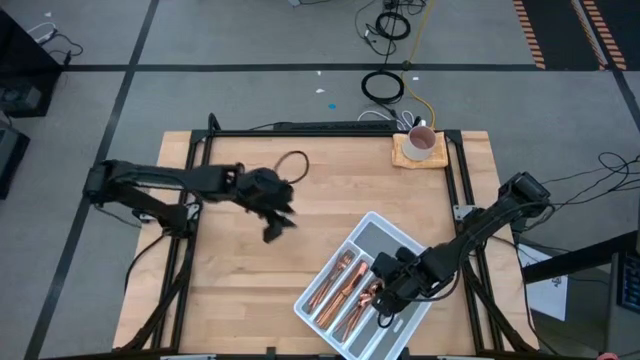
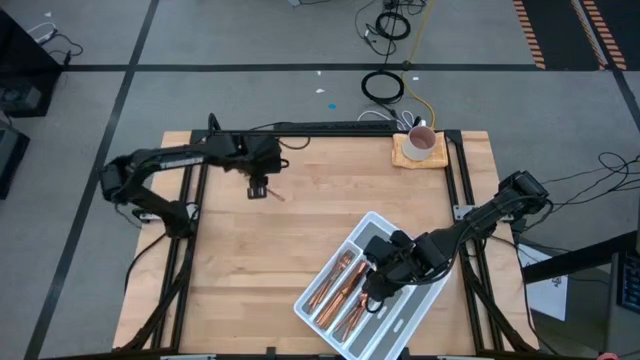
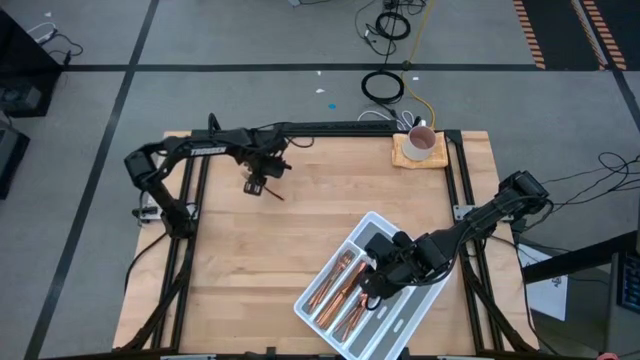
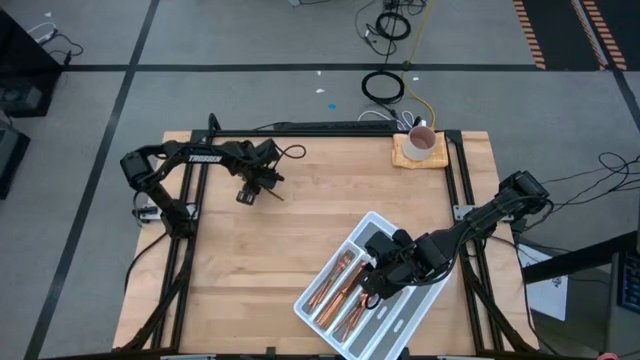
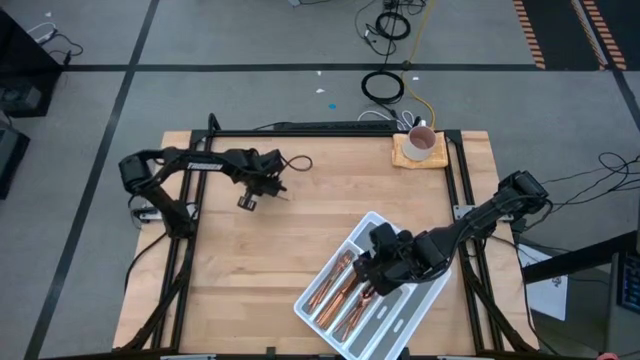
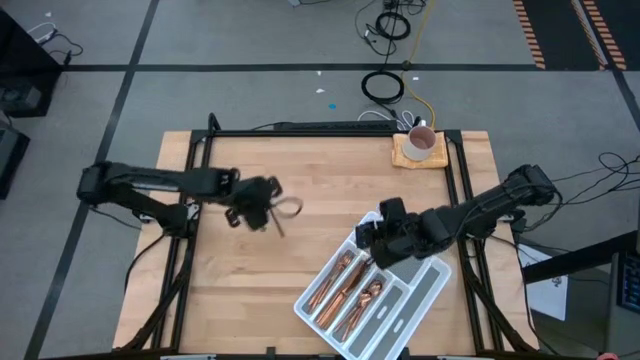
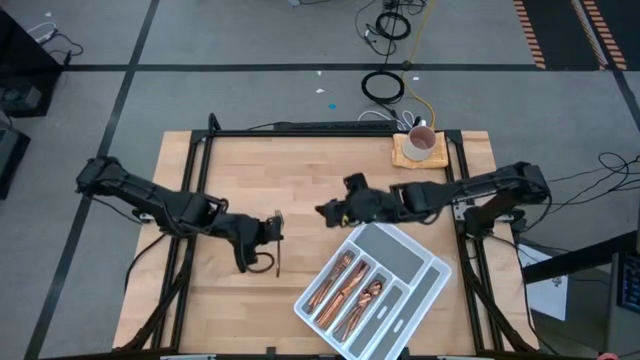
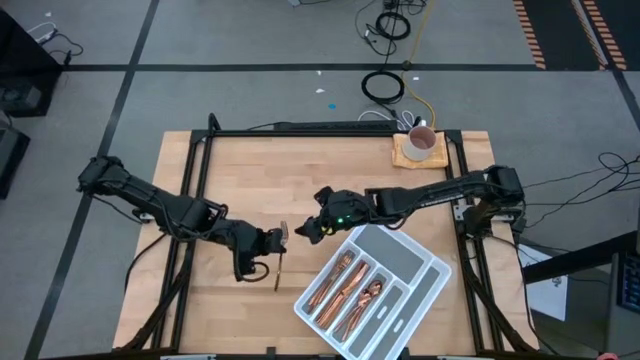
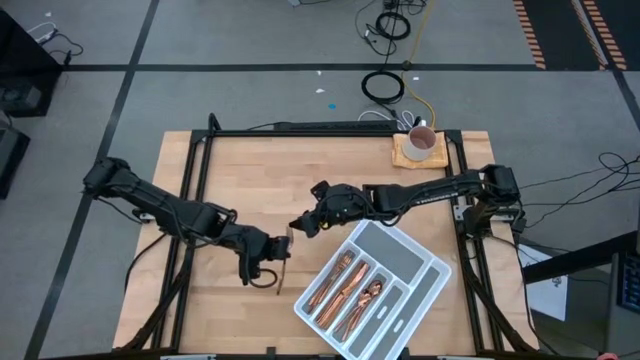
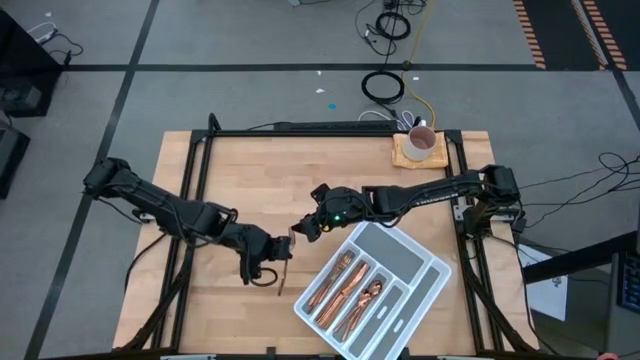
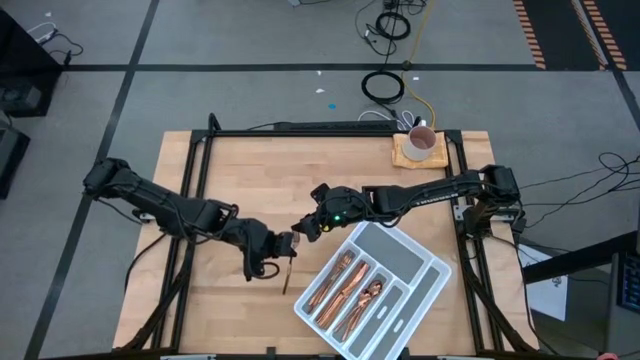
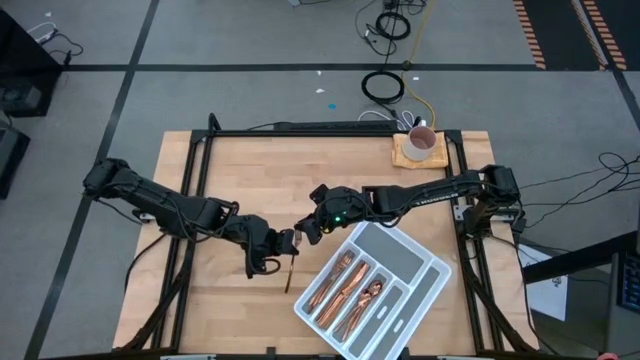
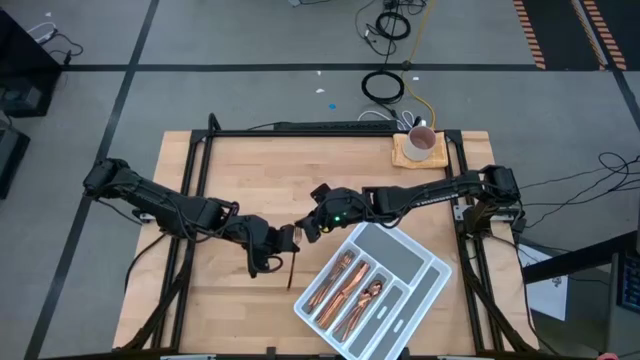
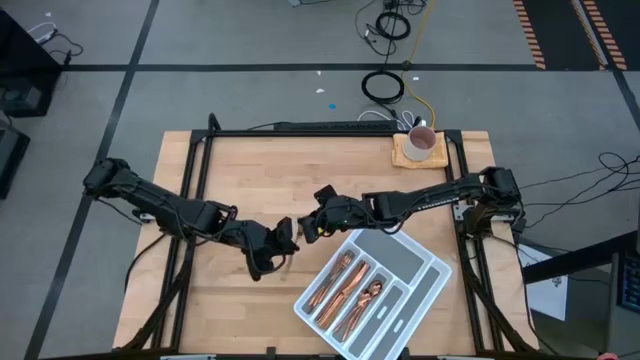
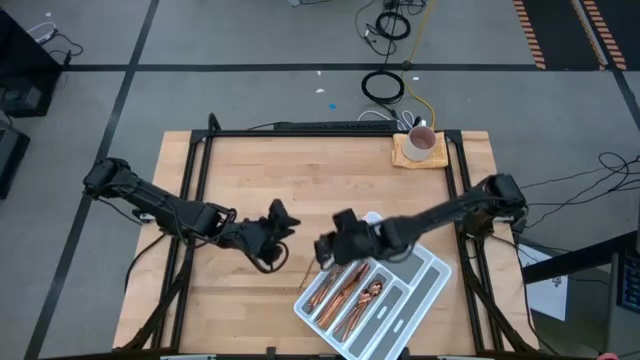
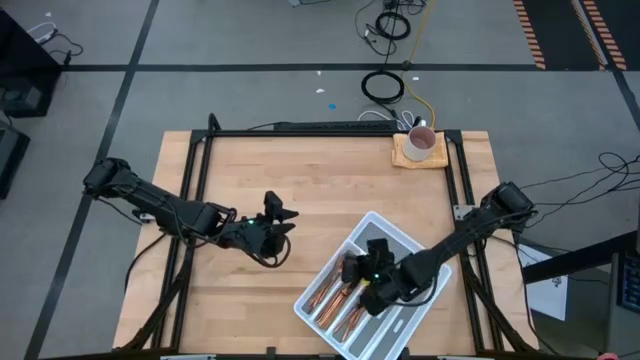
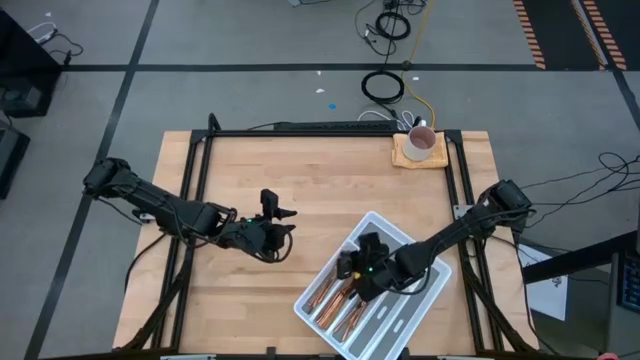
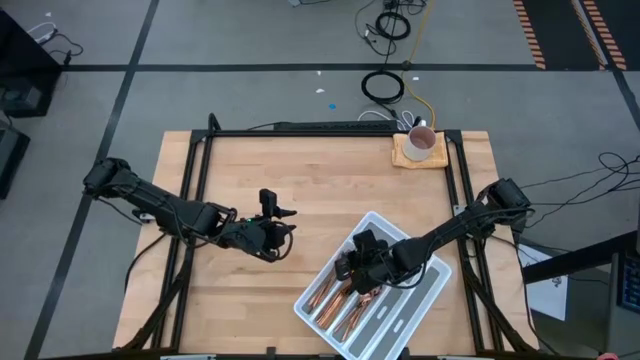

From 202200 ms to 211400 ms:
Task: Sort silverware
Put the gold fork into the silverware tray

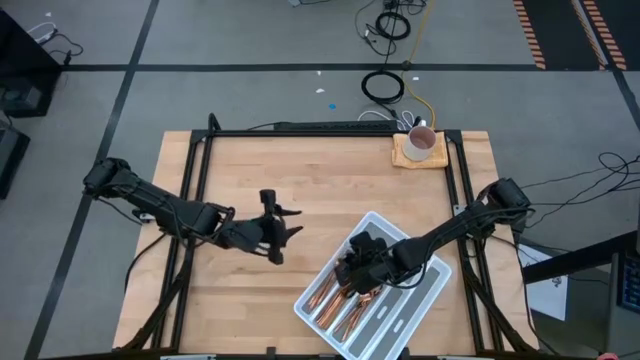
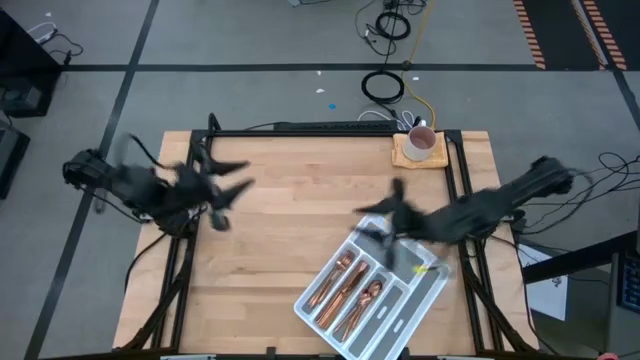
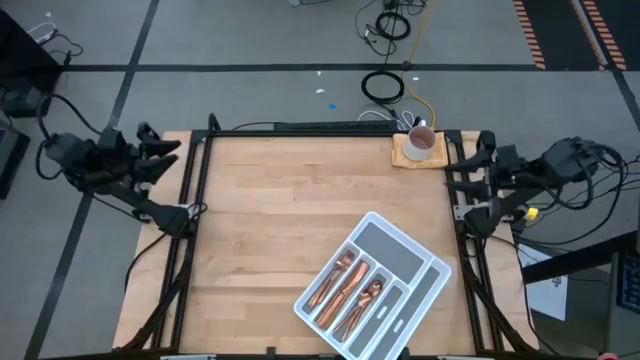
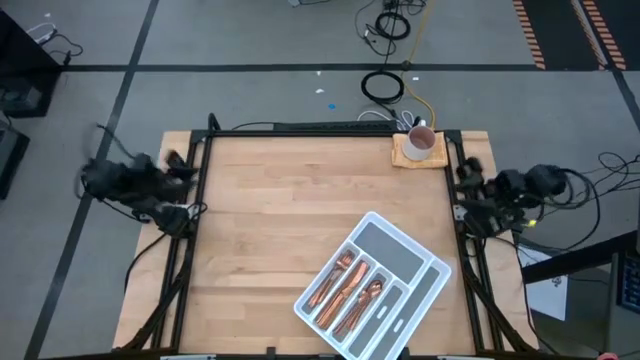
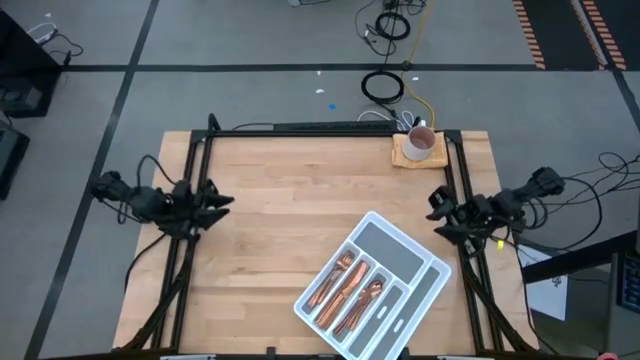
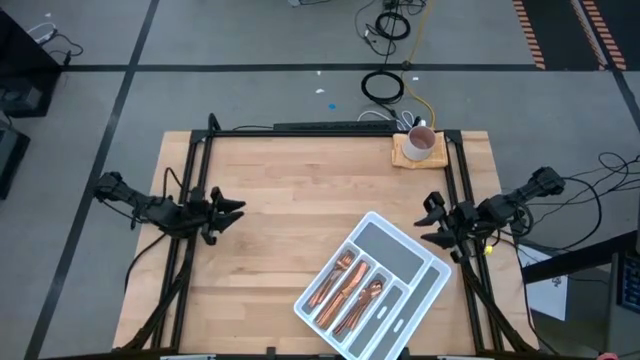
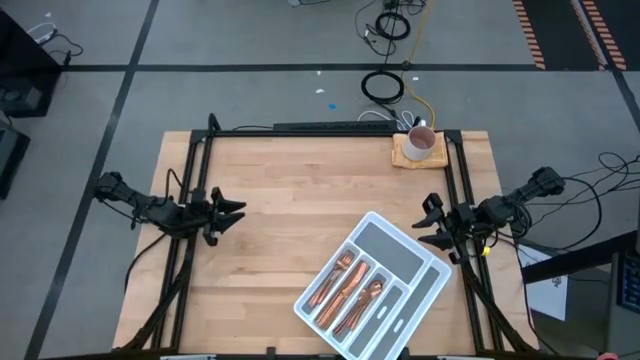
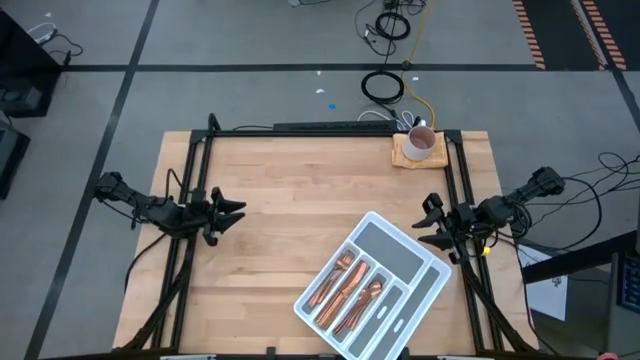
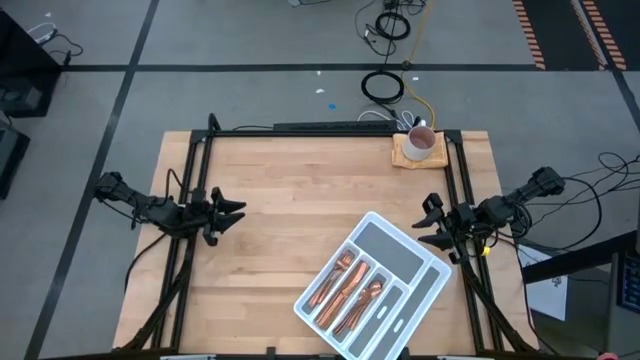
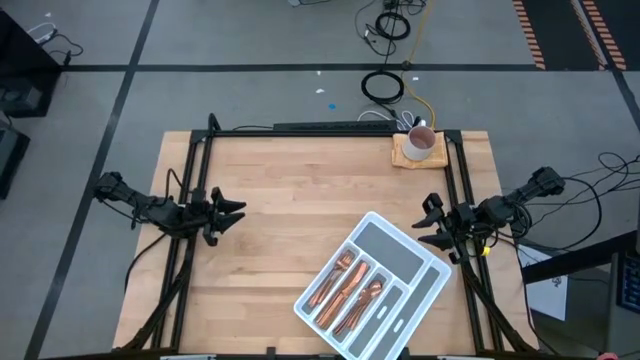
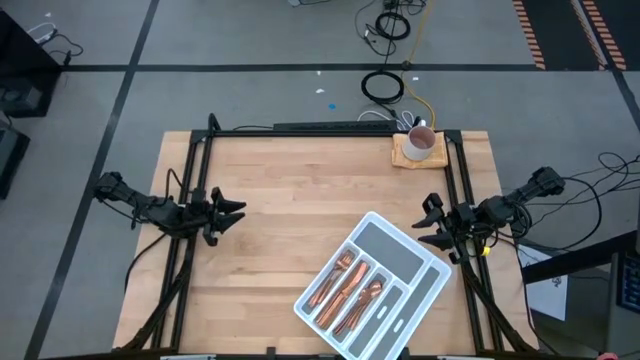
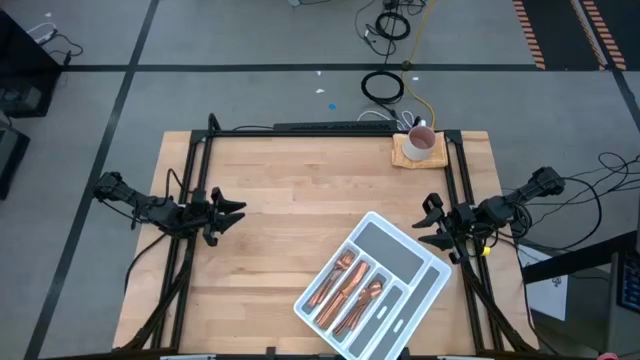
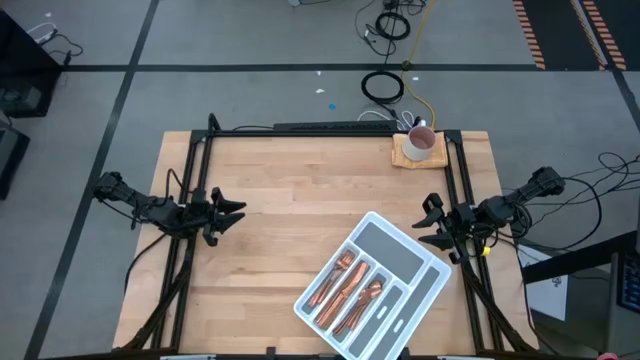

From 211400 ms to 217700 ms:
Return to Home Position
